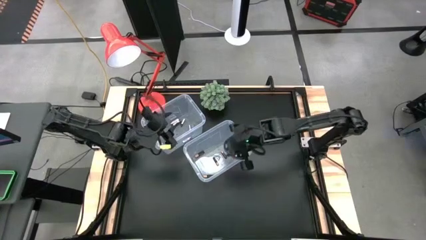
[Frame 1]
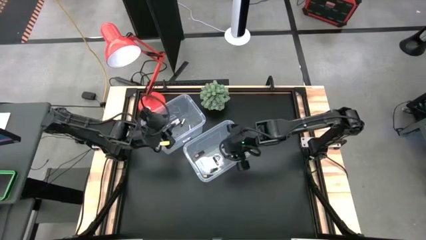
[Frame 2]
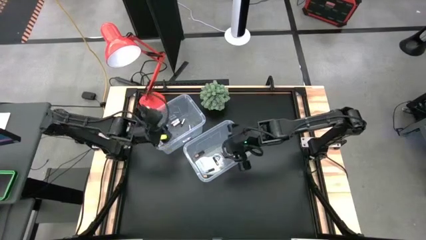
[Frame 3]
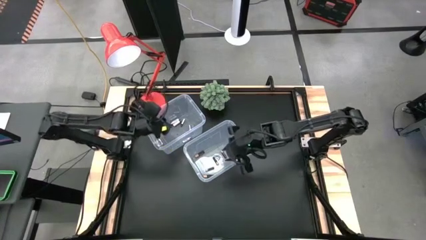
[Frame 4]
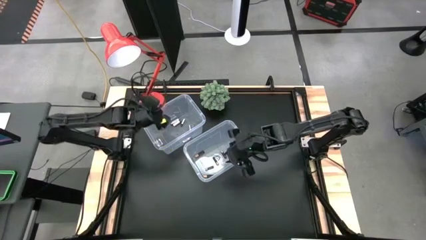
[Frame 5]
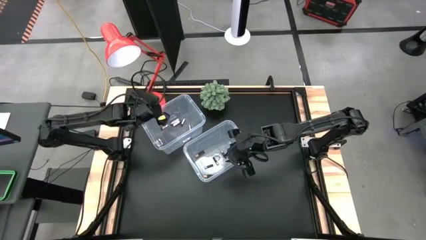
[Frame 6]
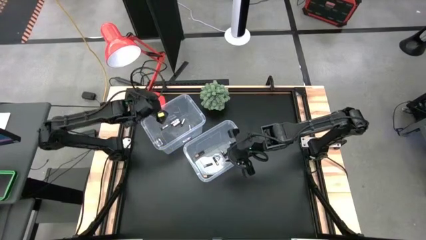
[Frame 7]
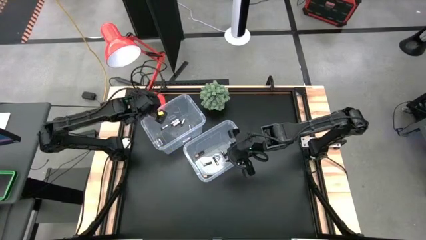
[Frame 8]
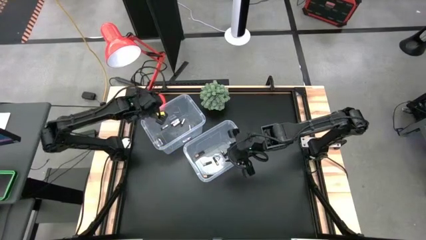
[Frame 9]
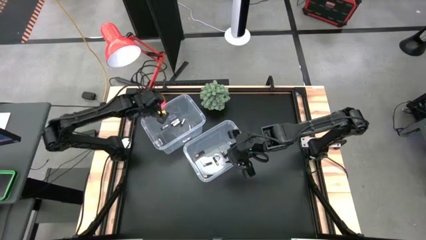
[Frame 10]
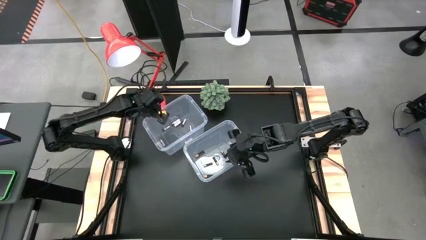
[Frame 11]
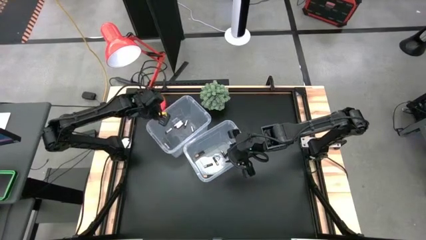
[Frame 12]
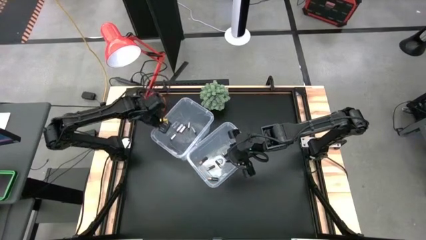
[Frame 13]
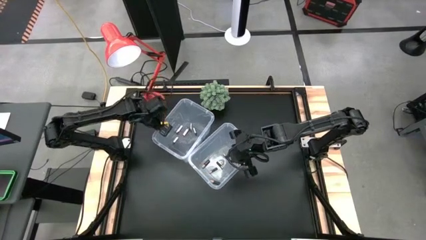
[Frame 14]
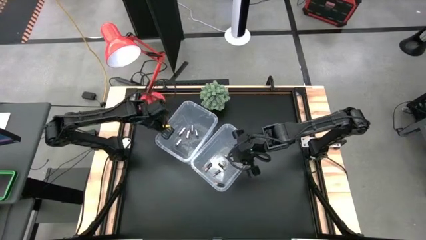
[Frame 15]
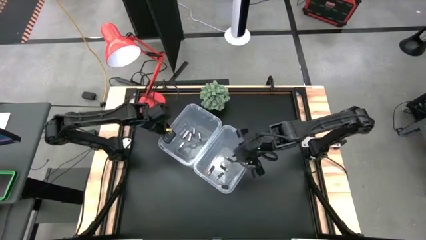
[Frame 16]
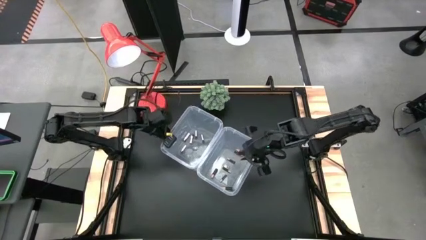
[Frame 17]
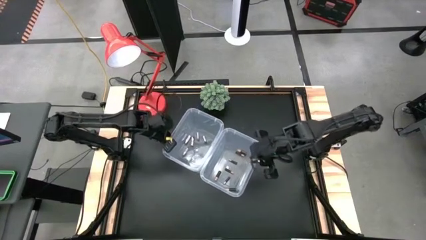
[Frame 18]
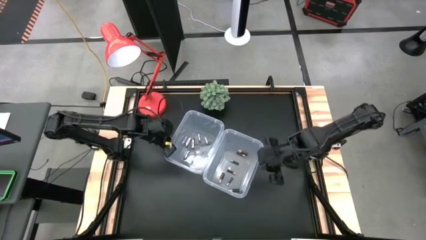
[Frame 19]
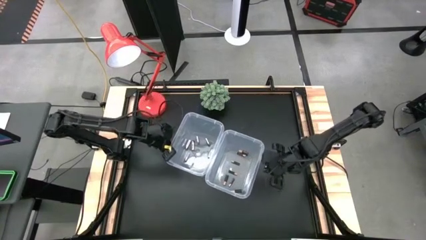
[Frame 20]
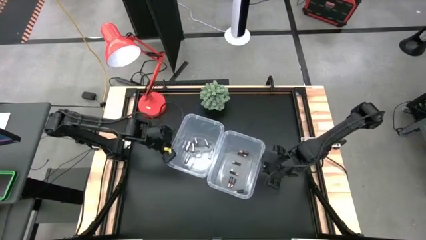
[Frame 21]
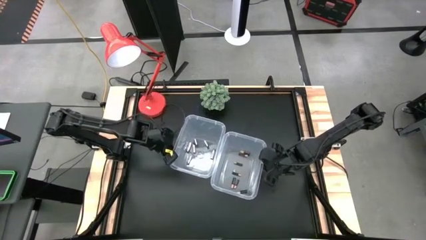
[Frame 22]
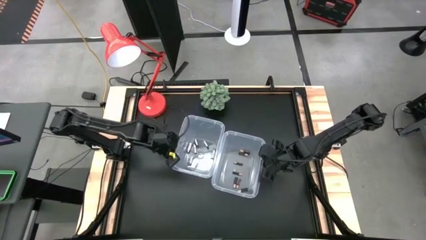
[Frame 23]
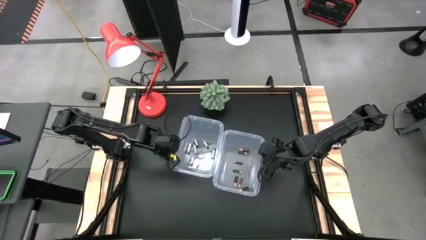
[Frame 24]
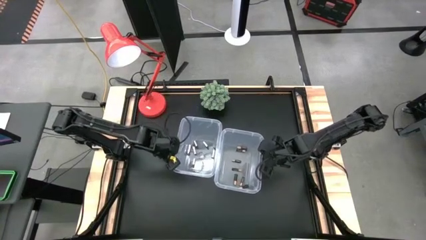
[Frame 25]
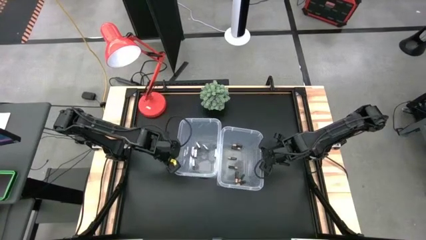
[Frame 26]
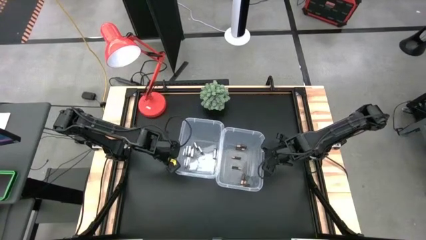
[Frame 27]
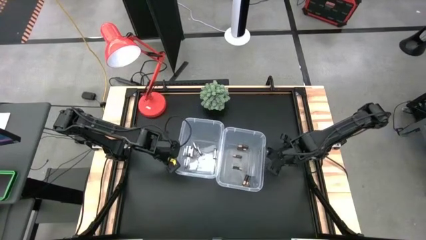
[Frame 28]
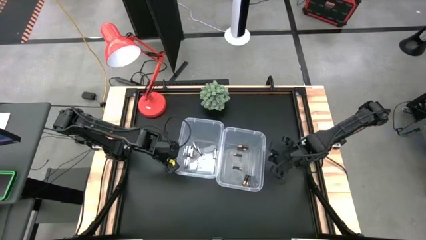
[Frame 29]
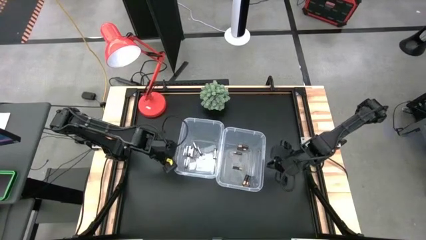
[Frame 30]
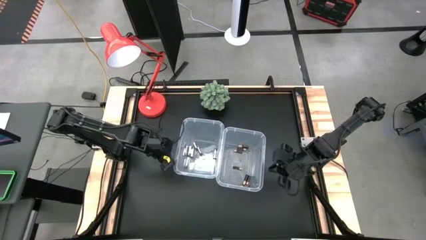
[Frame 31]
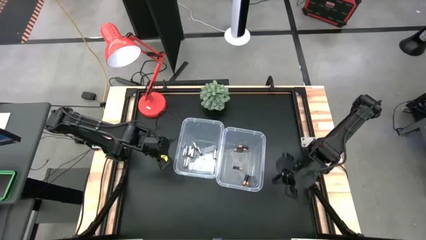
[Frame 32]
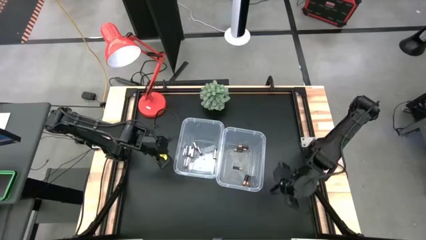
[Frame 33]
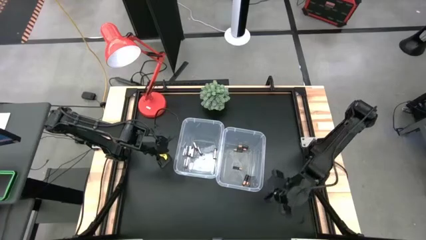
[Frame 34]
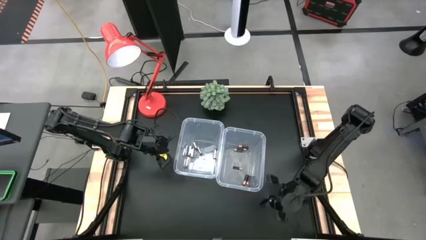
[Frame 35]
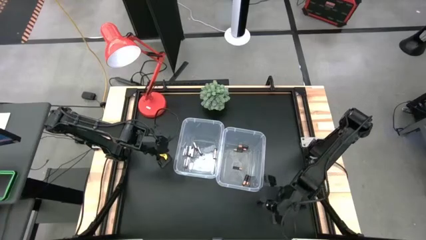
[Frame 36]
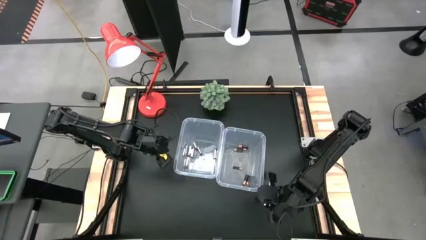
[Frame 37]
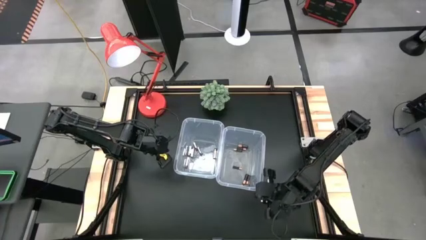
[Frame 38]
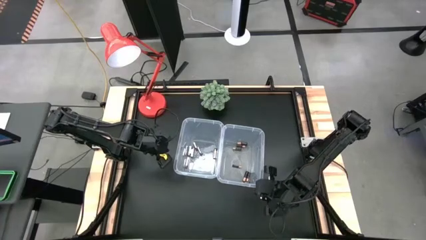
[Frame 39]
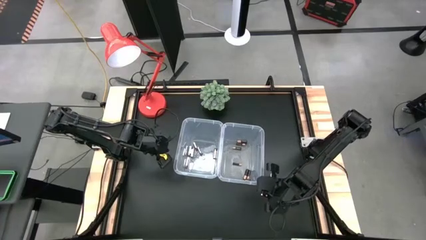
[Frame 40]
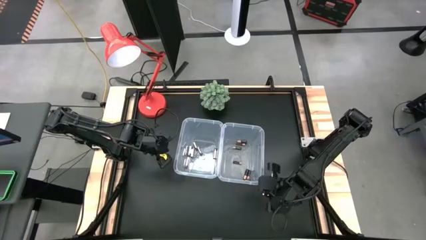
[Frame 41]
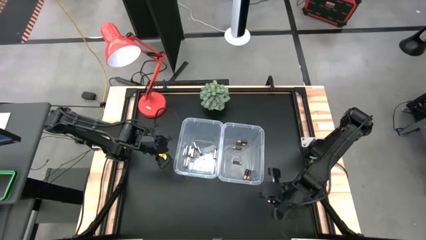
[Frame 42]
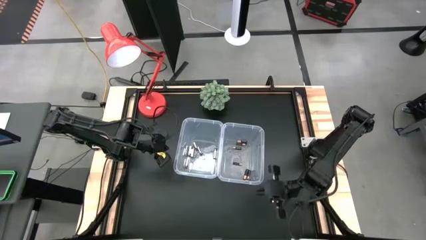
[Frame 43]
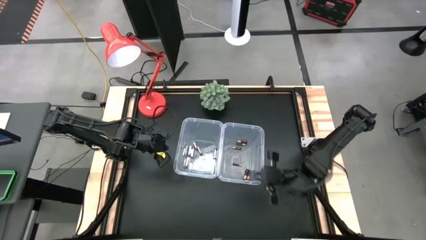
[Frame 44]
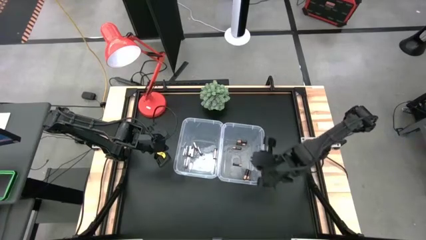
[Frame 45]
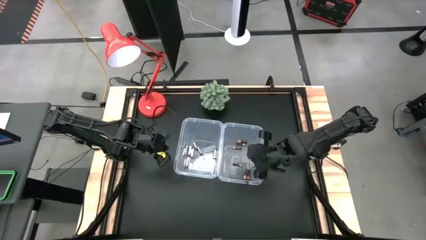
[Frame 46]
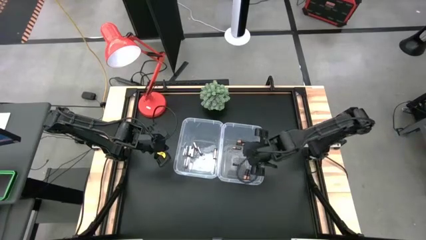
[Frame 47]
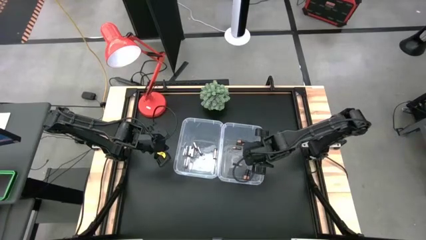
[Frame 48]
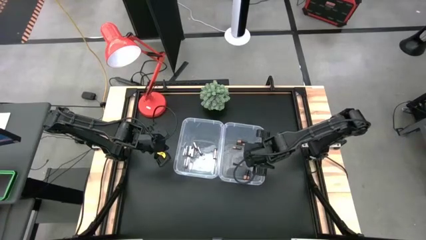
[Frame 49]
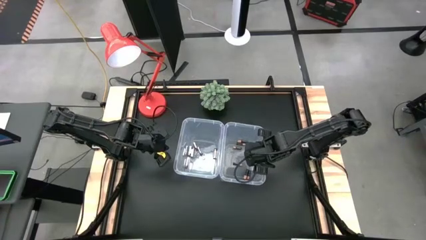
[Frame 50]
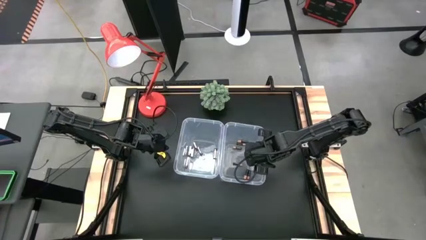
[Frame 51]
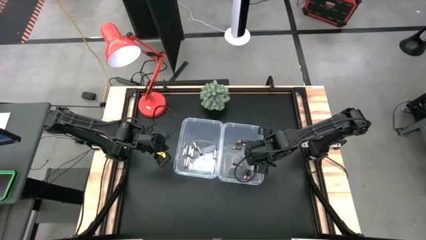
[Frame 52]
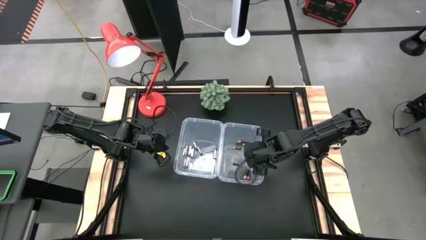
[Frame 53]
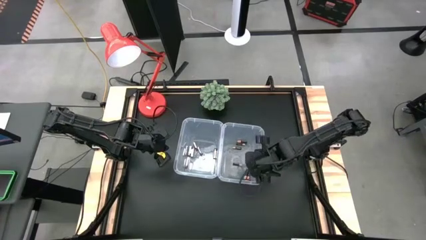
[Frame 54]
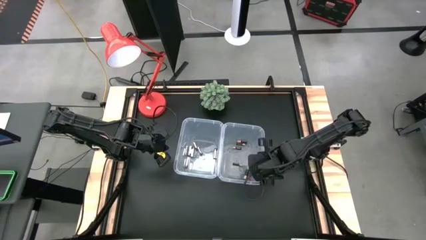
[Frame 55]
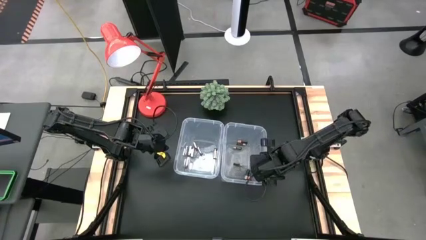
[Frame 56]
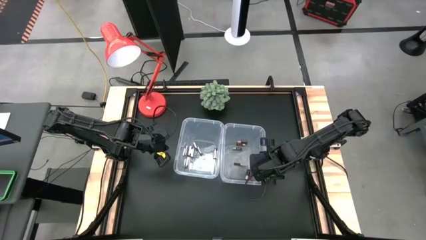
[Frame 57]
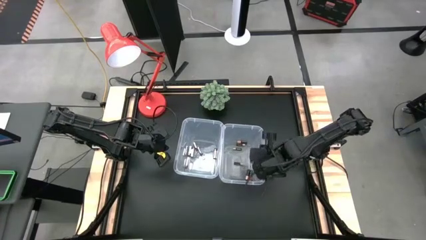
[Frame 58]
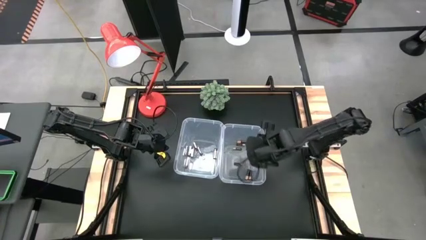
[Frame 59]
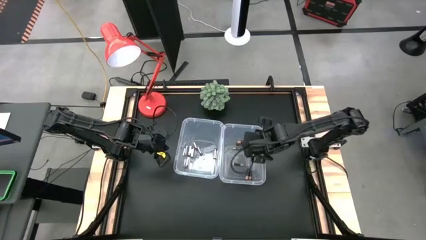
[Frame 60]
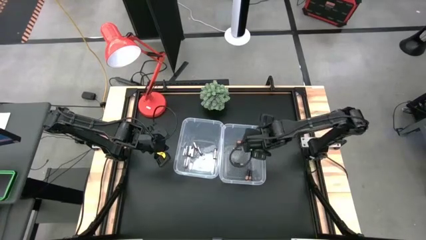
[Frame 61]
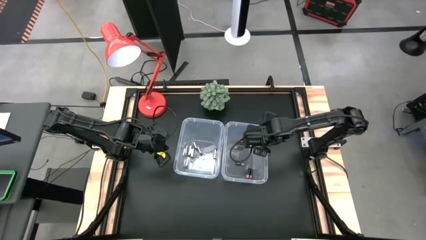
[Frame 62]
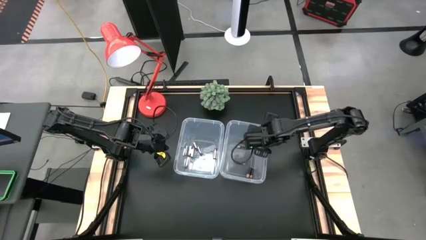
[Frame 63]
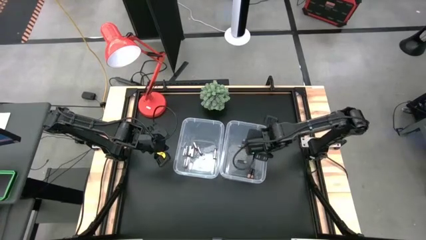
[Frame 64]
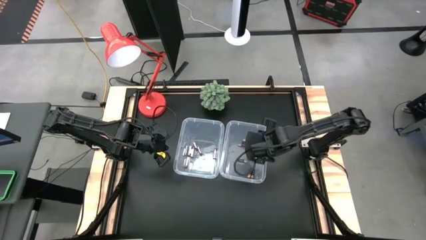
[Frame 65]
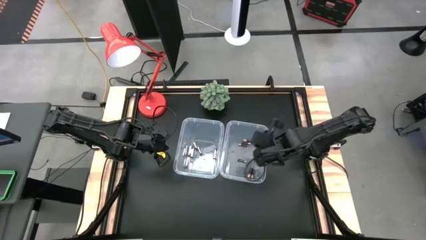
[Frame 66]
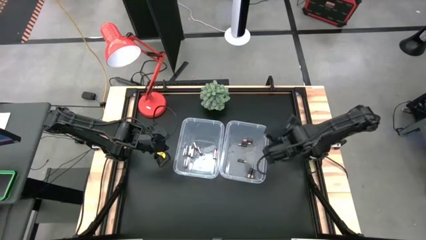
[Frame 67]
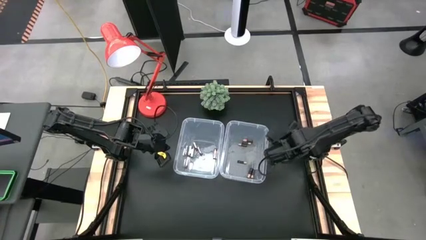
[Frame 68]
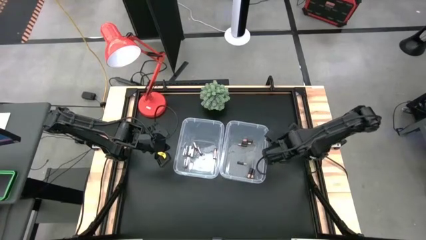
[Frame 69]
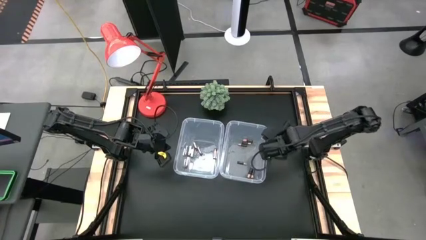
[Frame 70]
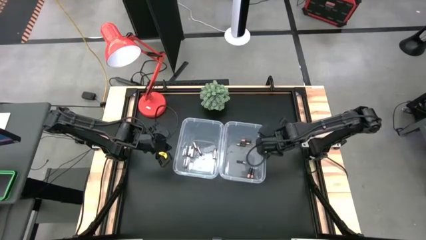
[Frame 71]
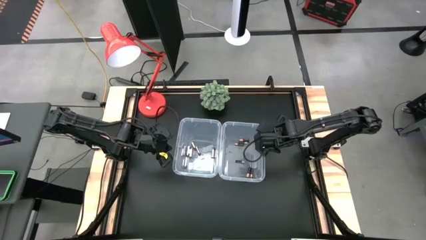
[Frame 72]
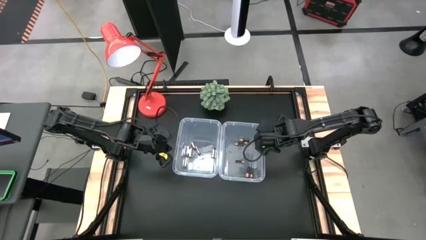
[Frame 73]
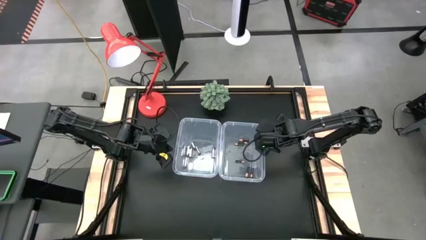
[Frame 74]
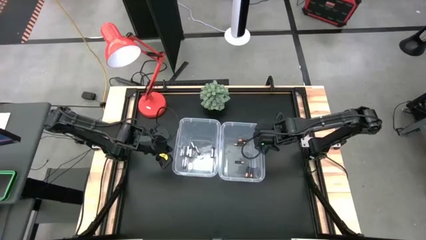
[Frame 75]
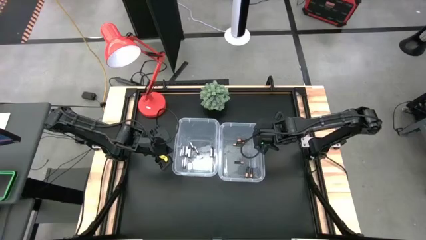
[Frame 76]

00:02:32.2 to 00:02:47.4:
Task: Sort batteries
Move the transparent bins to the center

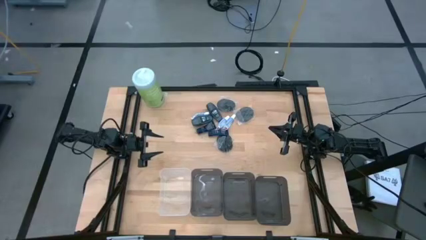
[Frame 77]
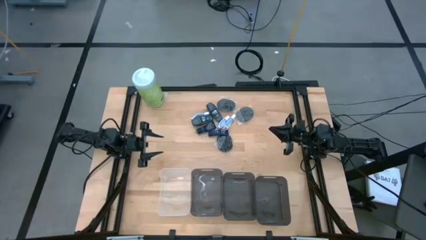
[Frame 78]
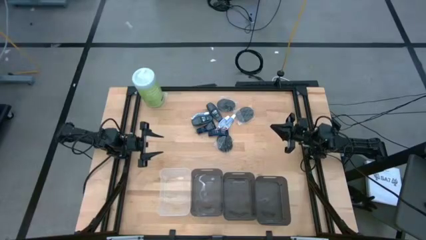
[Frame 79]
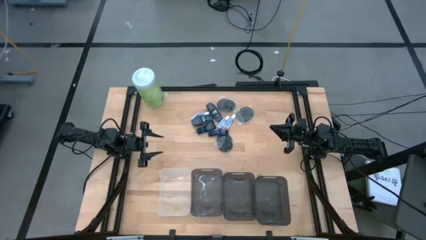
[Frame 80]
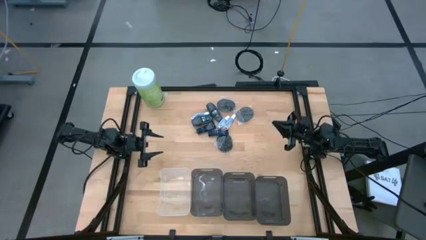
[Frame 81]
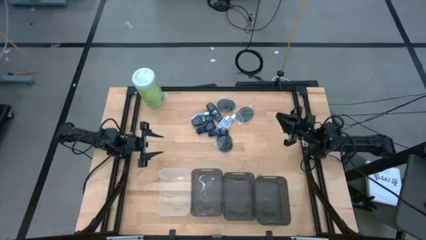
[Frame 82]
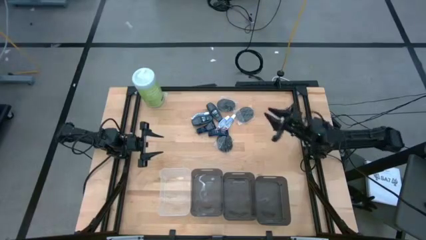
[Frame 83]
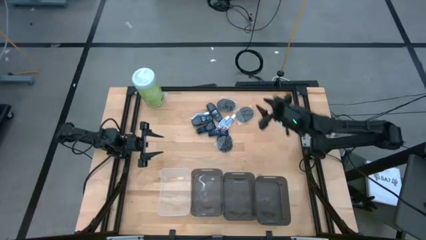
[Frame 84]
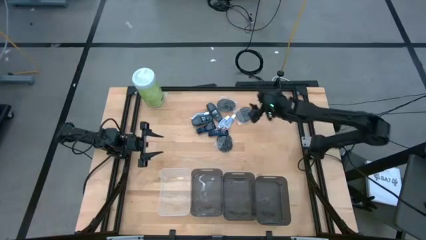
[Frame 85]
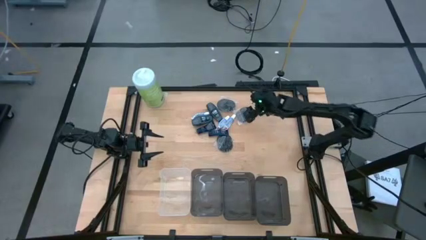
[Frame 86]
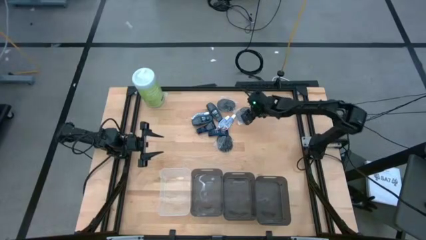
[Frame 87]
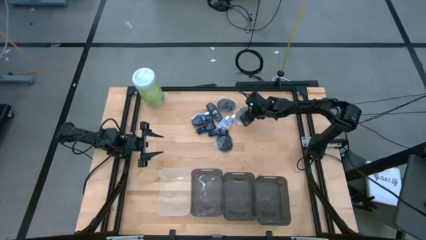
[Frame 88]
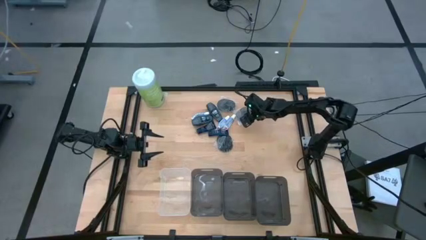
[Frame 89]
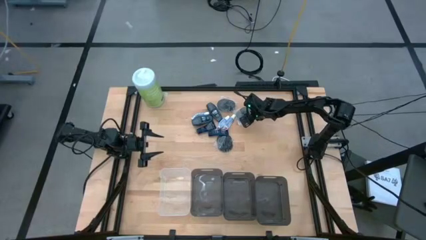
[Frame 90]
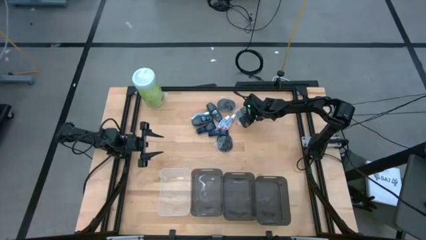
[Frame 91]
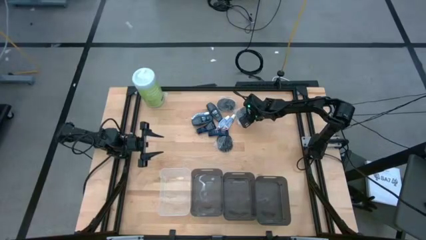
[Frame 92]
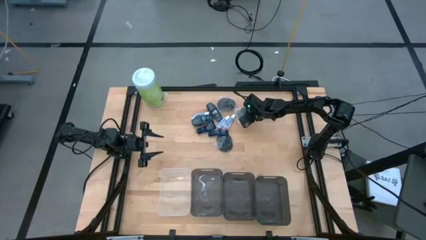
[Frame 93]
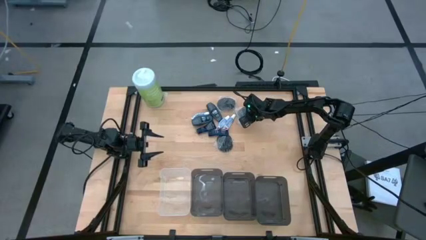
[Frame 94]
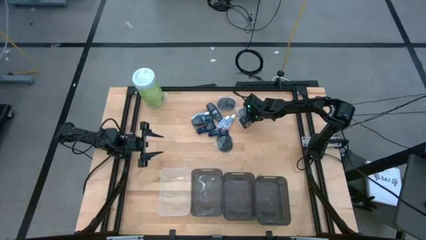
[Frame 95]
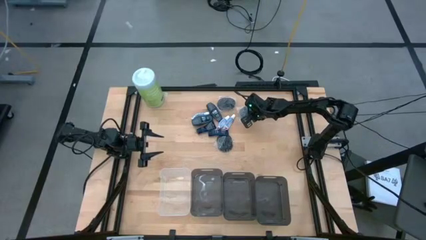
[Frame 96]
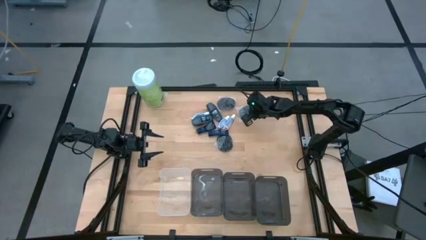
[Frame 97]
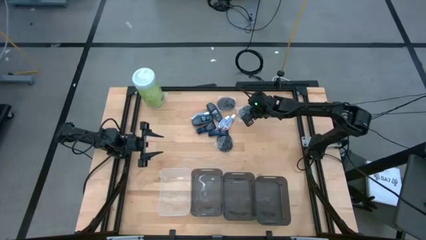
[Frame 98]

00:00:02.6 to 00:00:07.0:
Task: Pick & Place Travel size toiletries
Put the top right black hairbrush into the right black bin
